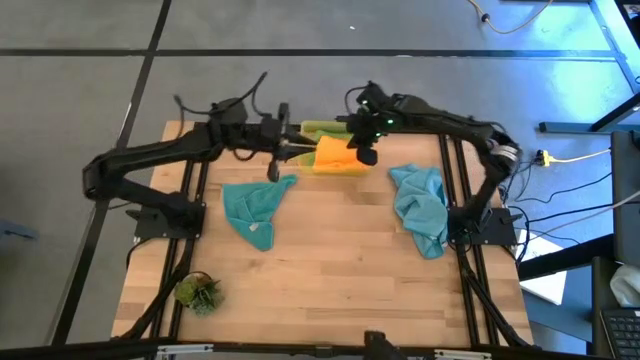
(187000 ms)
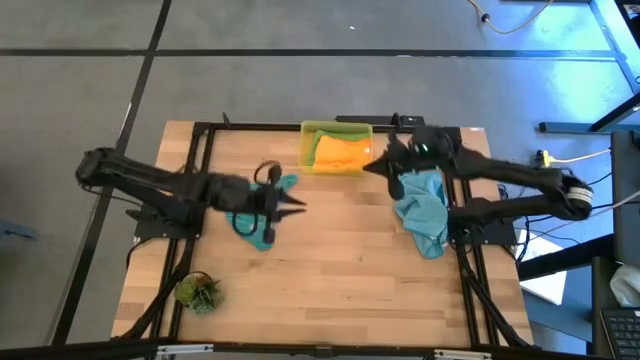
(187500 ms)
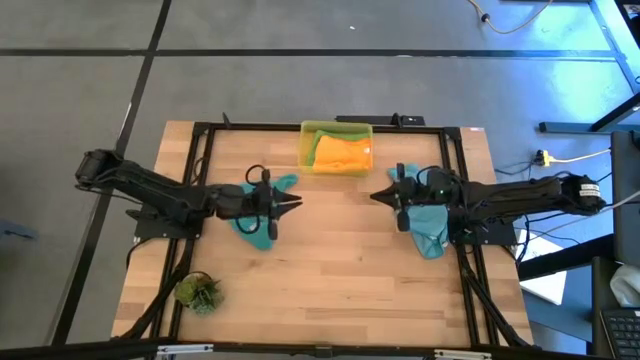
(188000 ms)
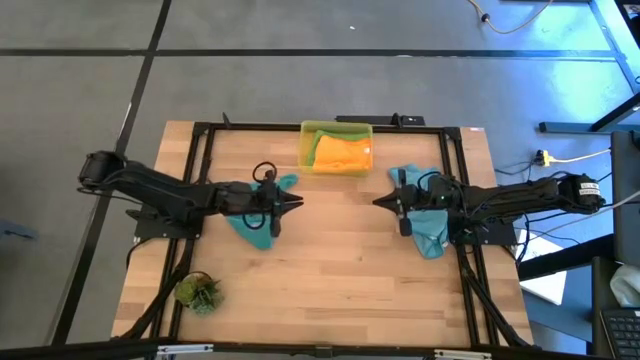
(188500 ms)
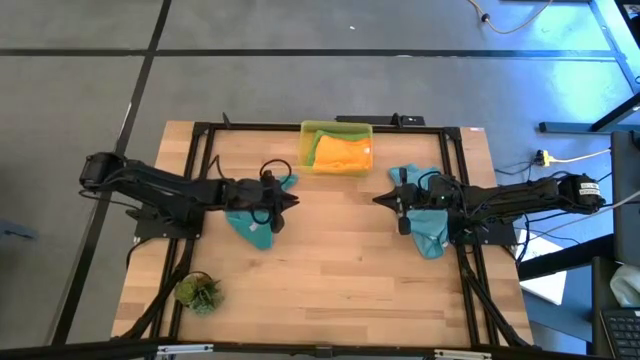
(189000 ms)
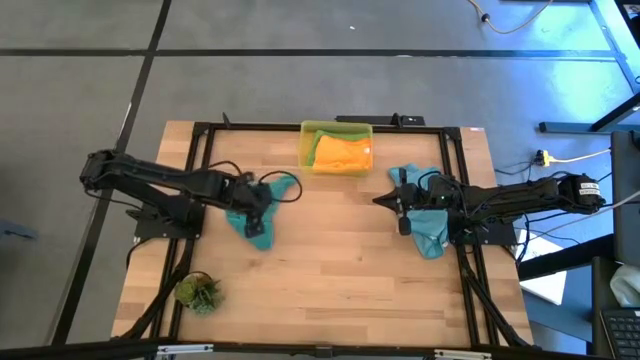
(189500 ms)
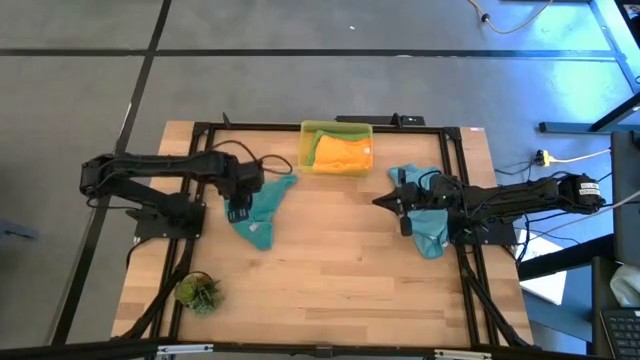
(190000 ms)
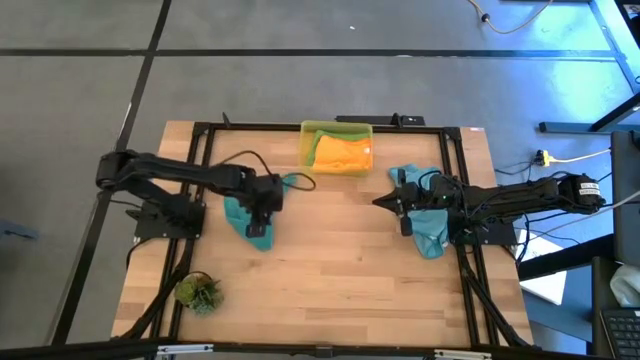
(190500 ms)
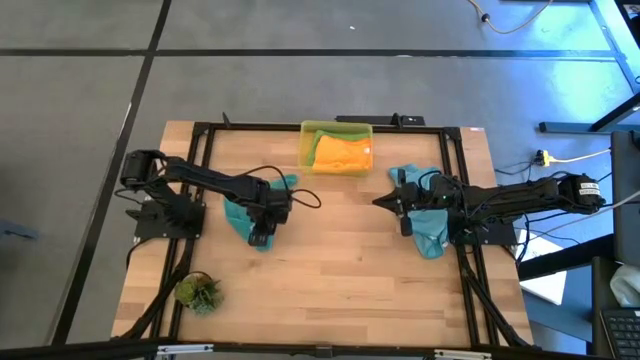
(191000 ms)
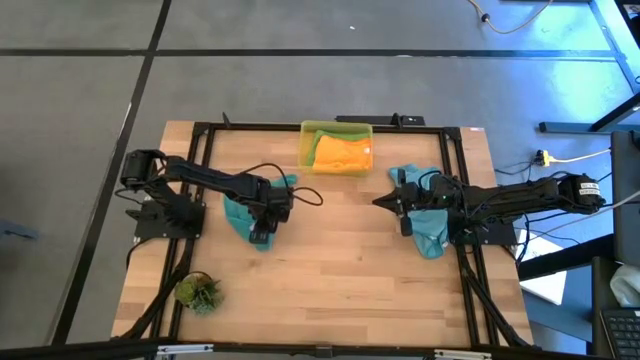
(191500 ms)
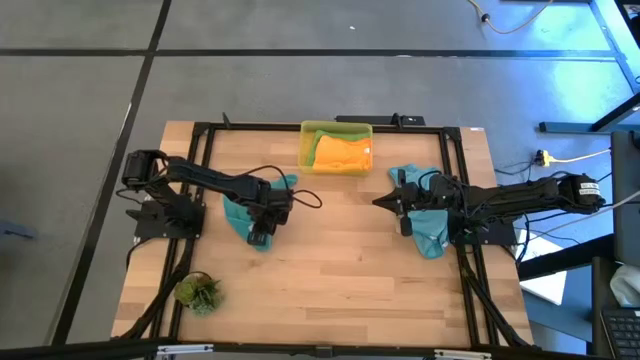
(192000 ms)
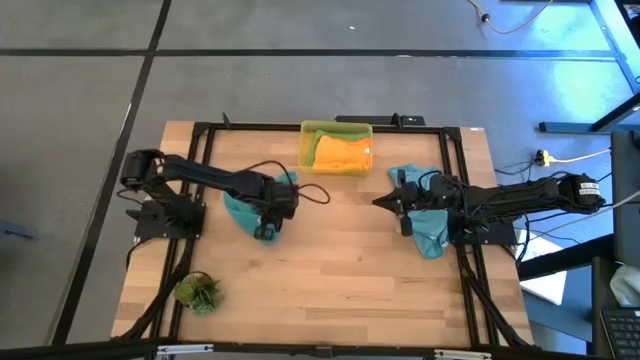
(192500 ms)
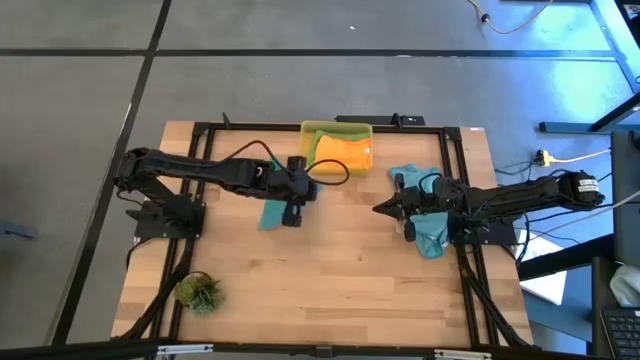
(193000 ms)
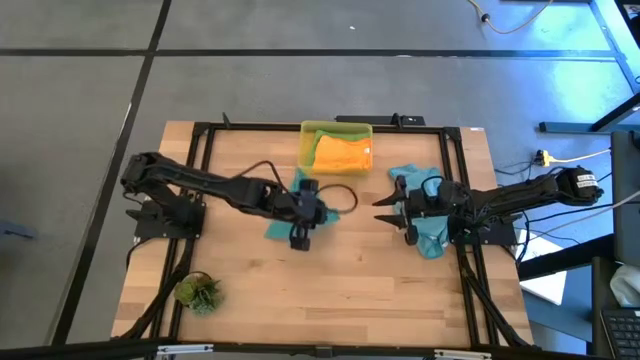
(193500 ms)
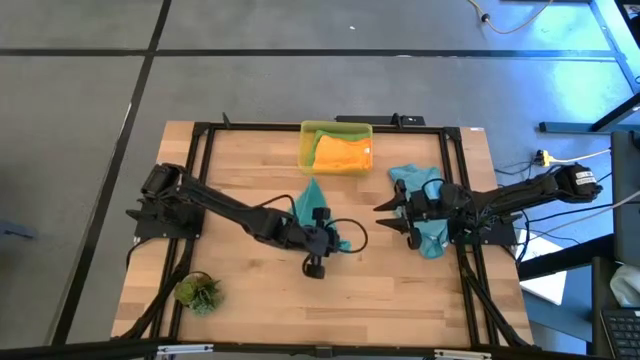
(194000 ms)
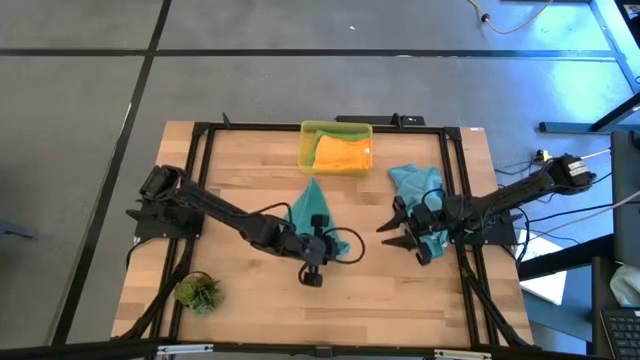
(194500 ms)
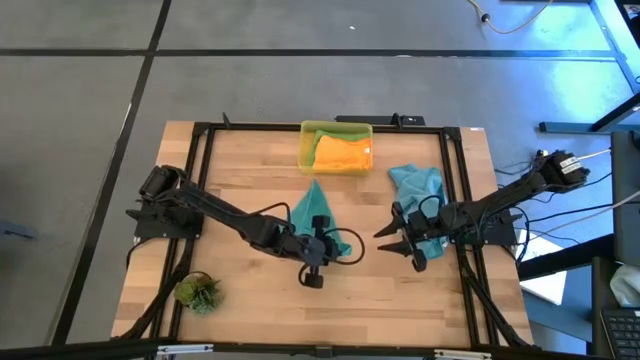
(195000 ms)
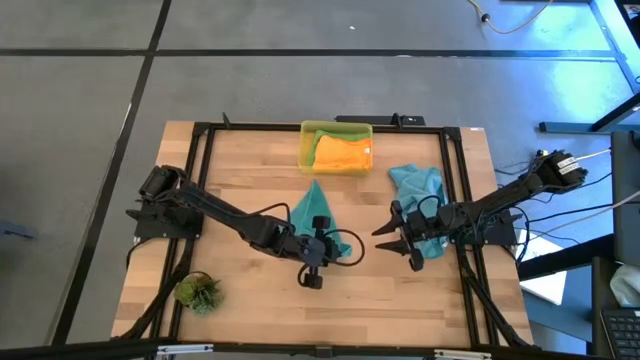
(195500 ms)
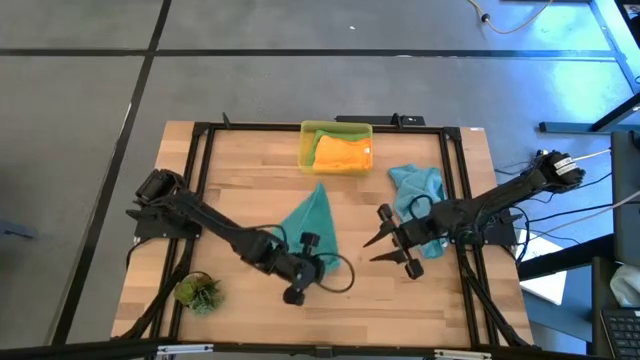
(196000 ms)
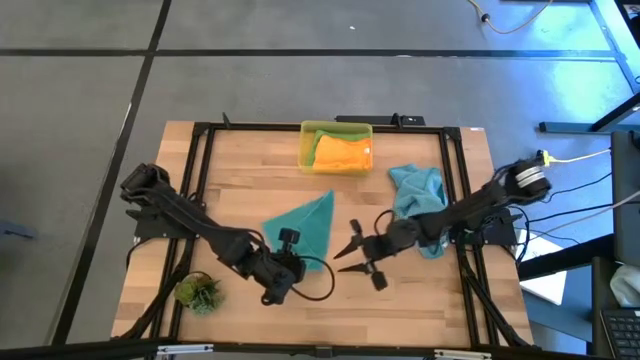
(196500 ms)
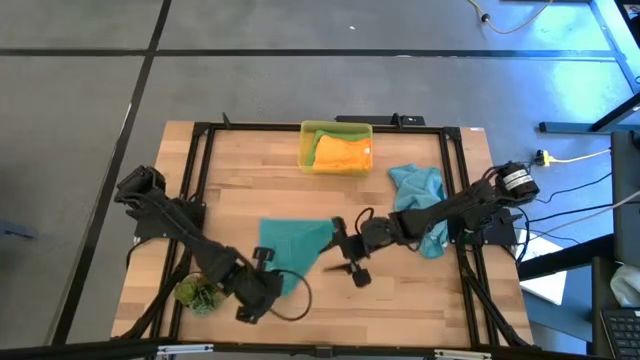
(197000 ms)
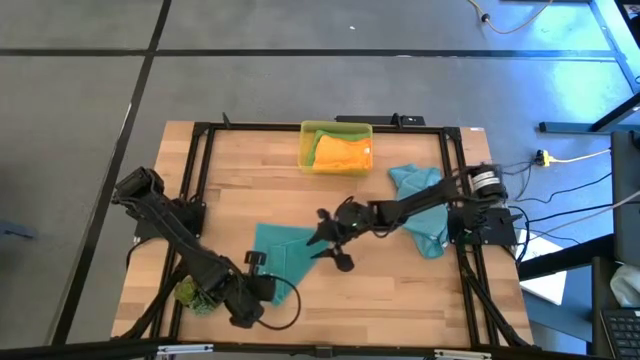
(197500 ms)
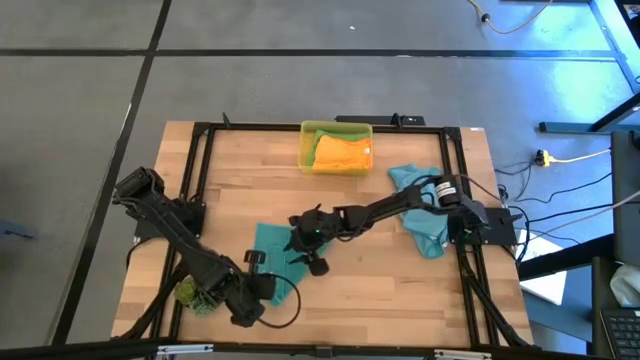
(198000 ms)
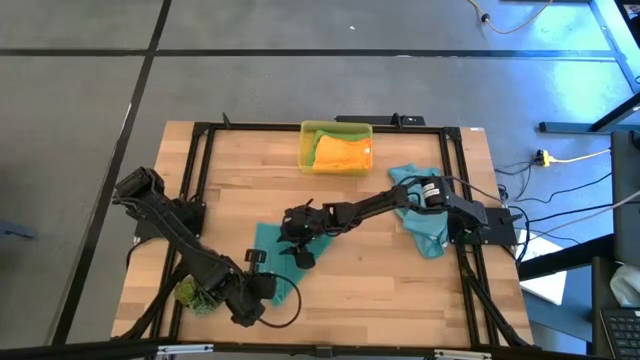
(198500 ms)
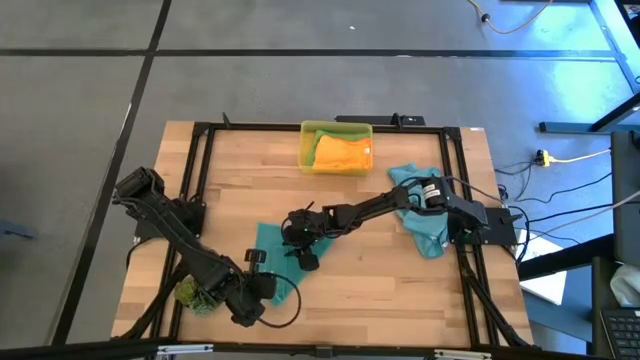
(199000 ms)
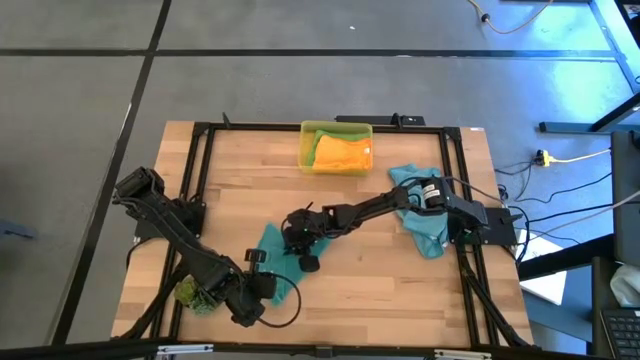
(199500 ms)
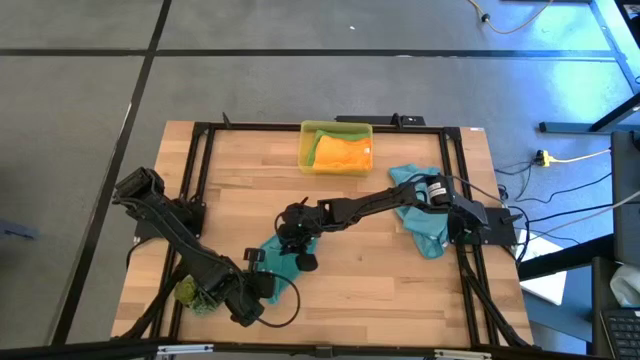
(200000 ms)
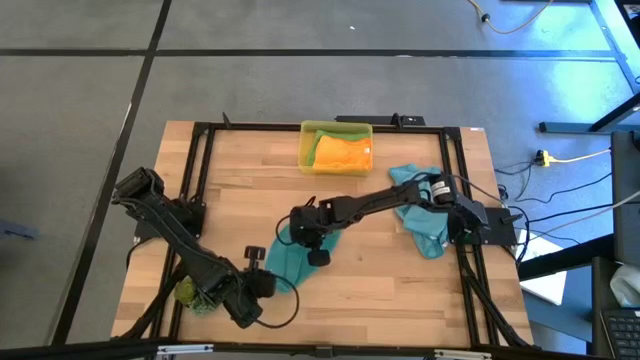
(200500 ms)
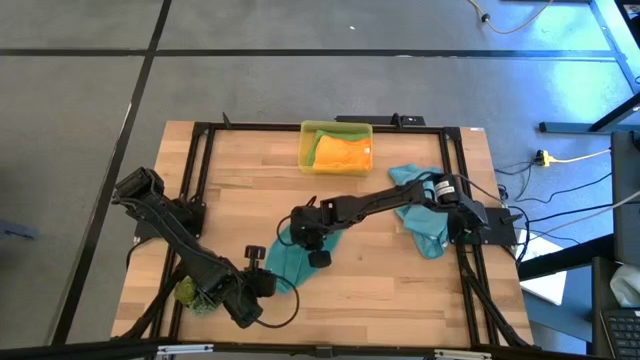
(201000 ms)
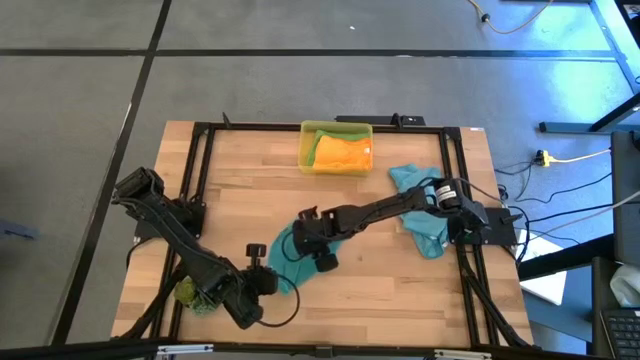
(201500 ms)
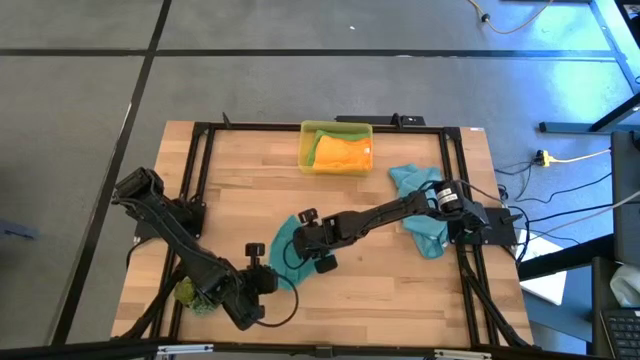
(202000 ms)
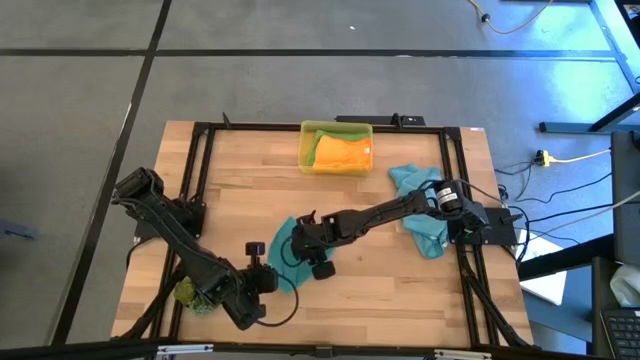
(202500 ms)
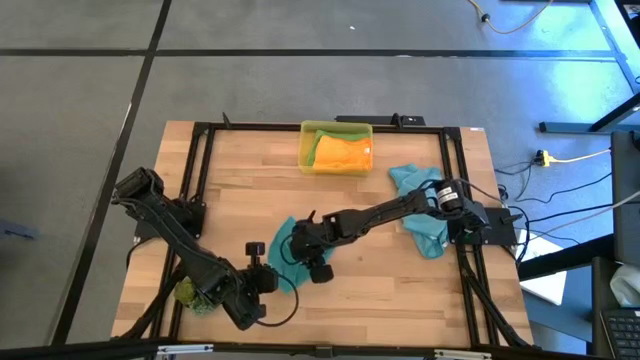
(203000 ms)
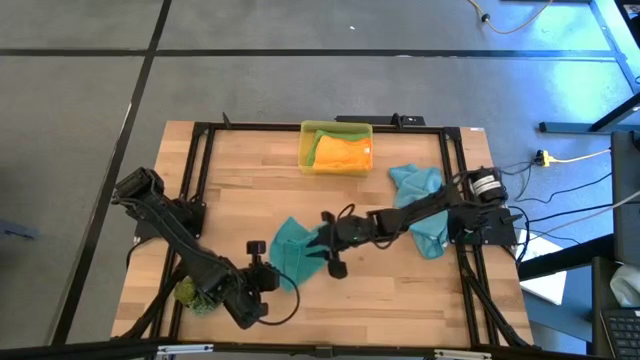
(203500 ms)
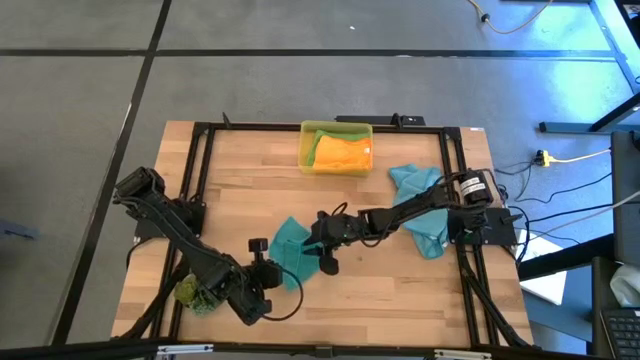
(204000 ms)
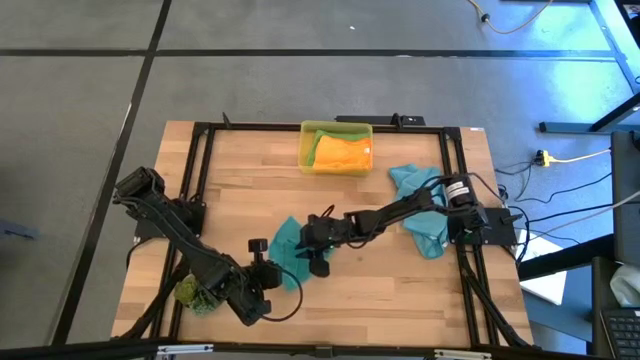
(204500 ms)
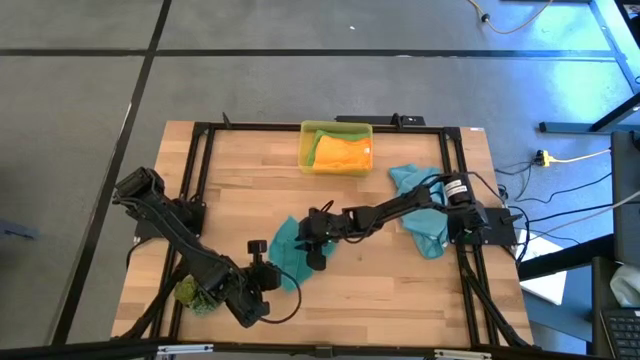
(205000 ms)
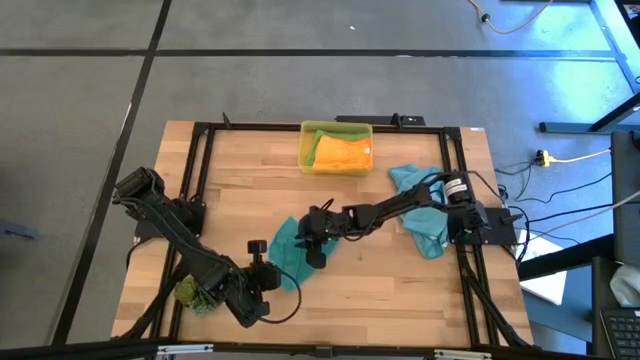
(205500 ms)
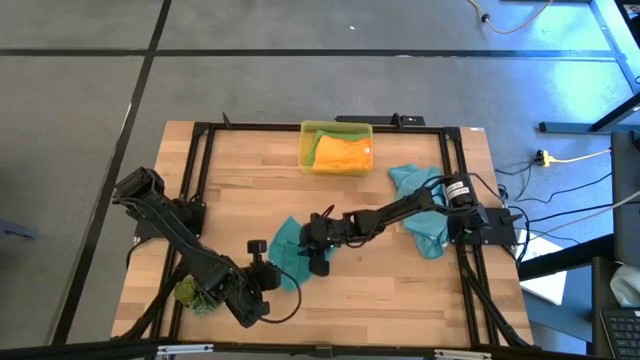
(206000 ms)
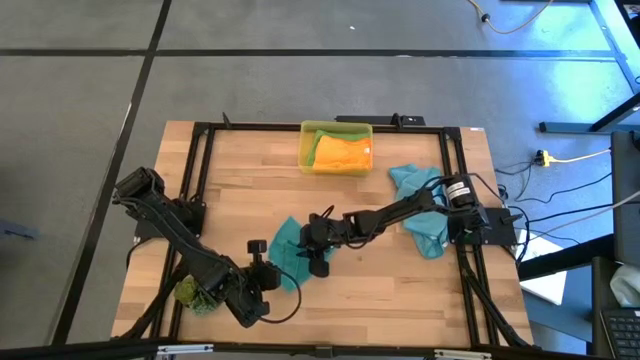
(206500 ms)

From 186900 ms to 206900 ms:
Task: Fold microfiber towels
Fold the left blue microfiber cloth

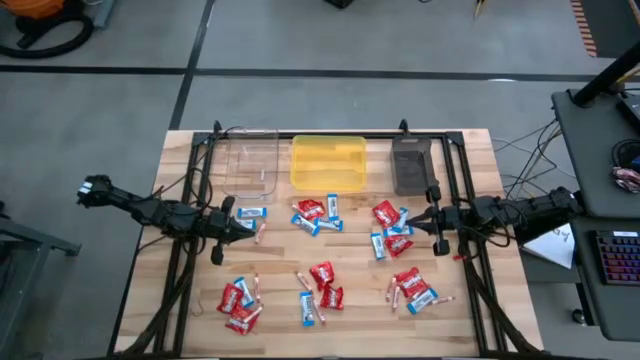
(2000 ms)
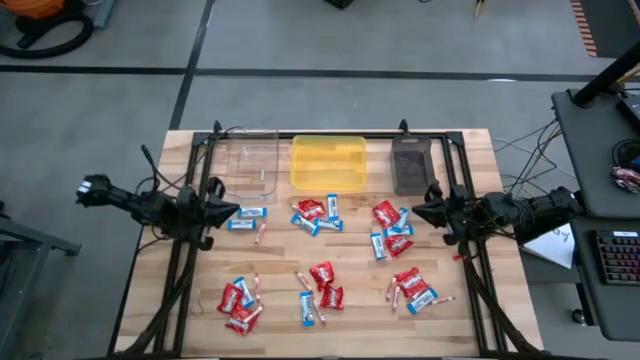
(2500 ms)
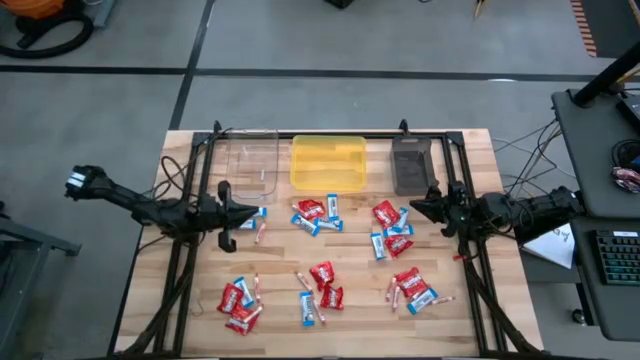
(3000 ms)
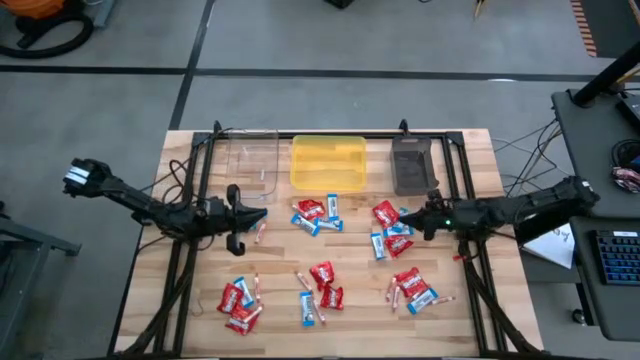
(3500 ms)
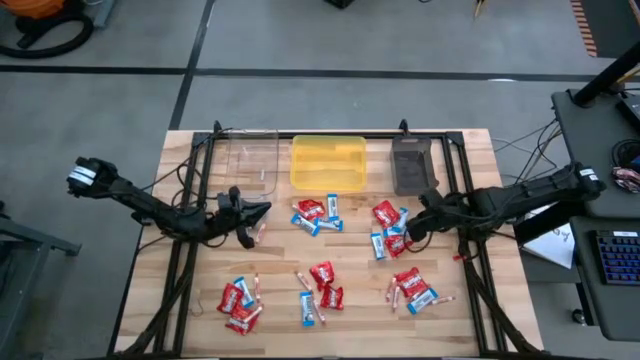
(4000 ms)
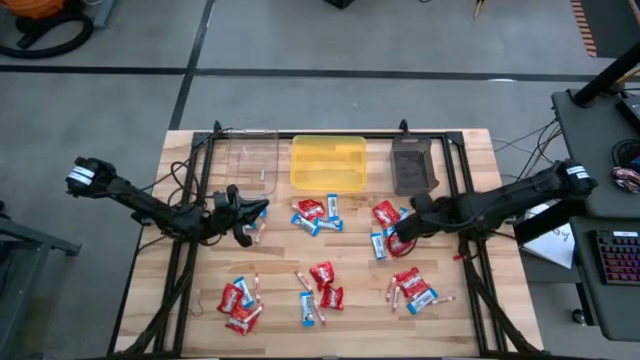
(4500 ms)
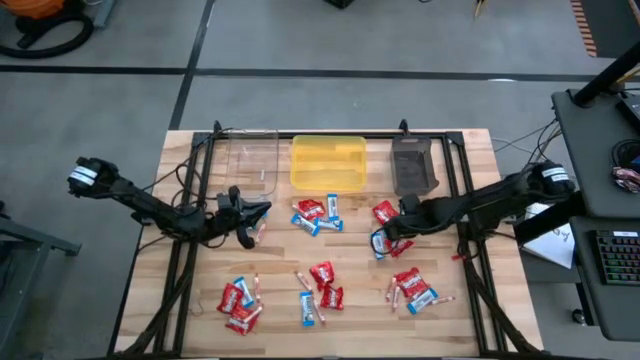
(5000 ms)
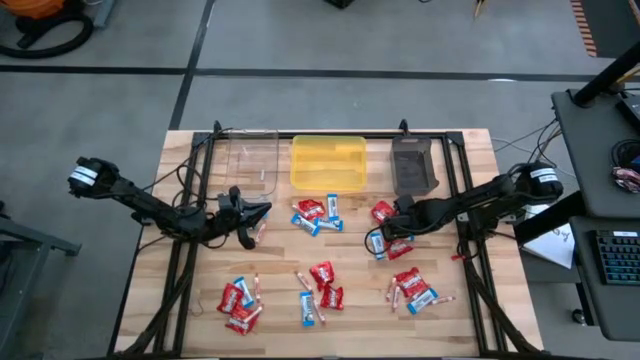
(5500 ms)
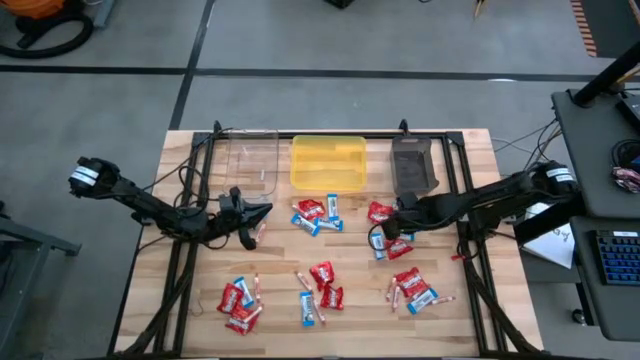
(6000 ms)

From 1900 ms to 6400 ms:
Task: Sort candy
Put the white chocolate into the yellow bin
